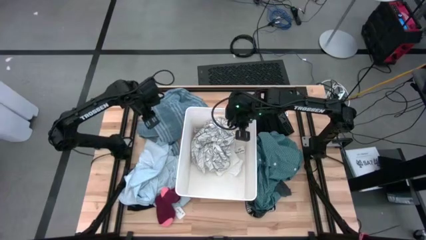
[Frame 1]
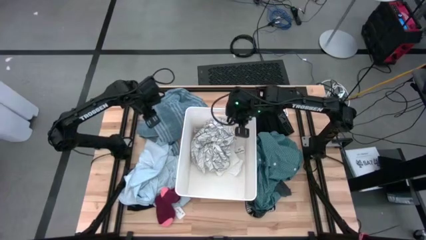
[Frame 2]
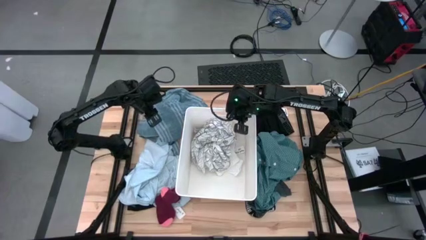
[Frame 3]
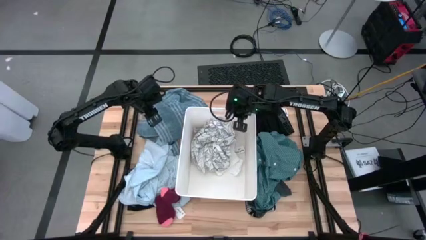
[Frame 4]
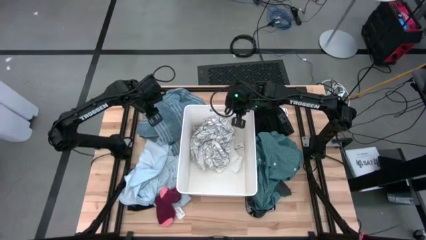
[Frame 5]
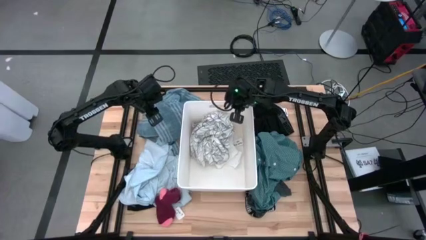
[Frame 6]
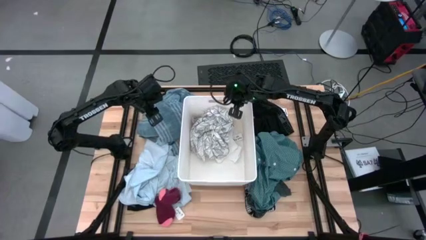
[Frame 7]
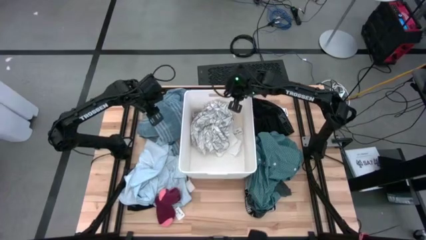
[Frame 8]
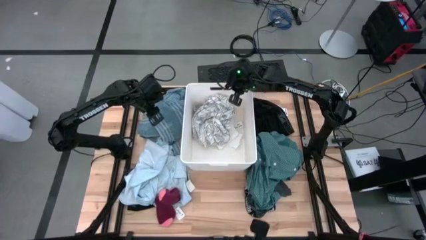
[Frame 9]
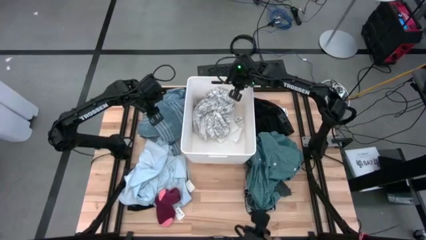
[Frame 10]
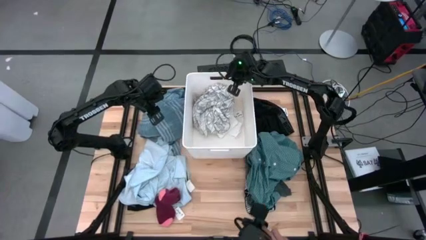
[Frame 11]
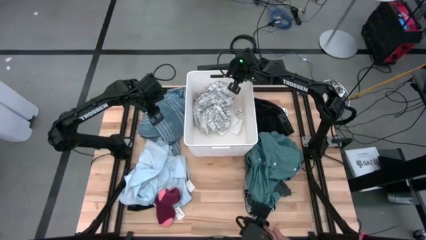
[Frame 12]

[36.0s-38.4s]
Task: Sort clothes
Move the white bin to the top center of the table

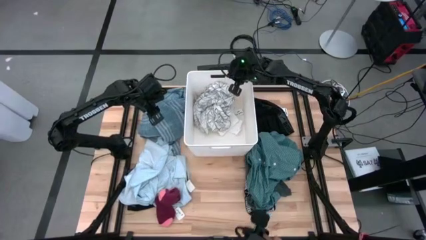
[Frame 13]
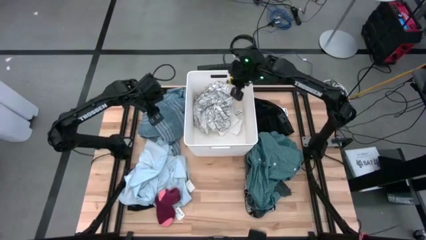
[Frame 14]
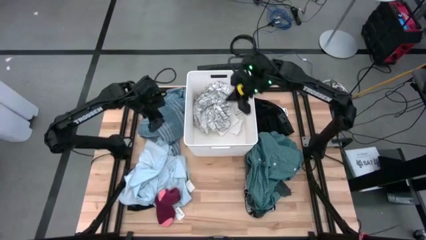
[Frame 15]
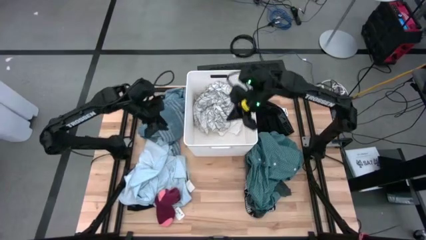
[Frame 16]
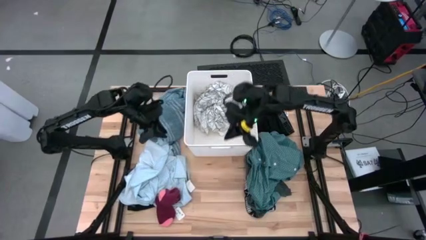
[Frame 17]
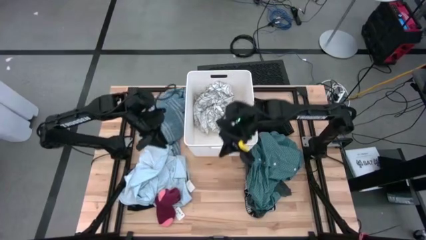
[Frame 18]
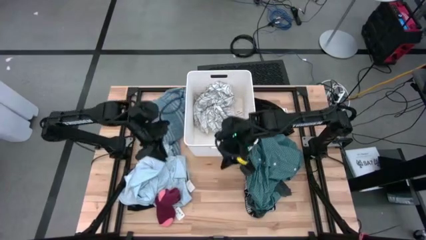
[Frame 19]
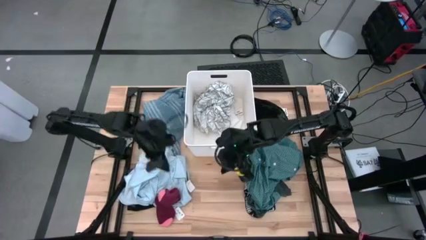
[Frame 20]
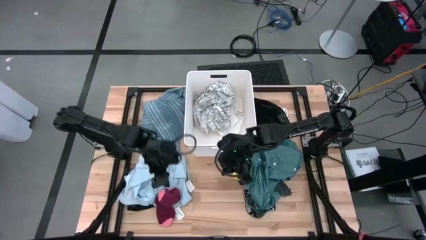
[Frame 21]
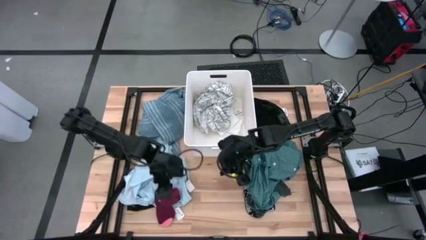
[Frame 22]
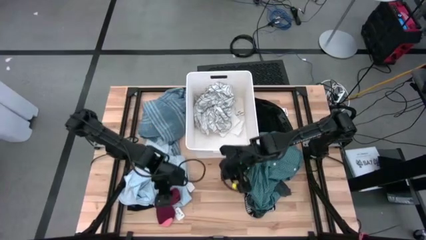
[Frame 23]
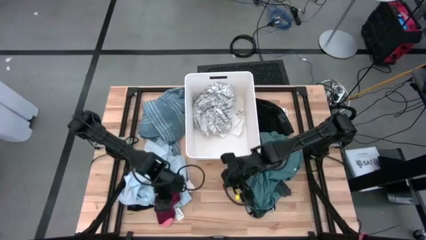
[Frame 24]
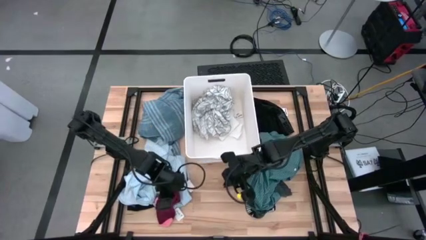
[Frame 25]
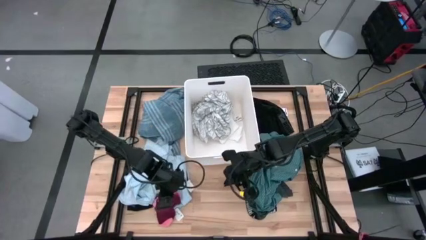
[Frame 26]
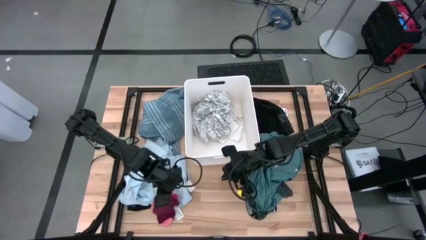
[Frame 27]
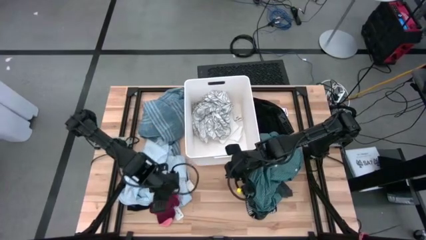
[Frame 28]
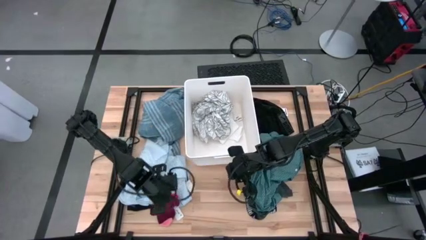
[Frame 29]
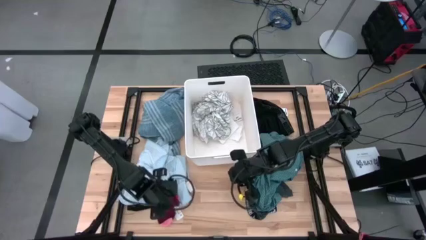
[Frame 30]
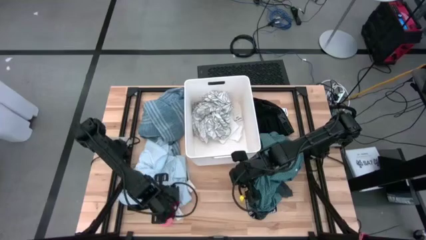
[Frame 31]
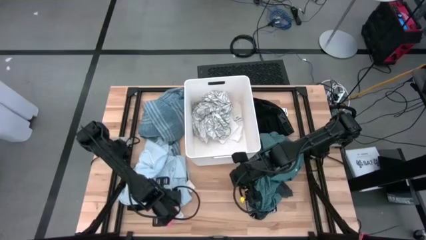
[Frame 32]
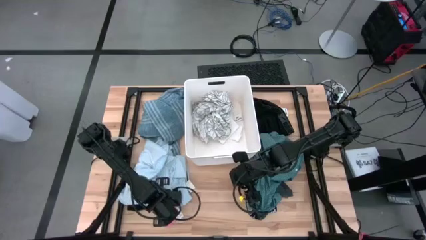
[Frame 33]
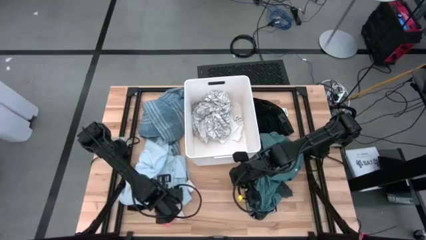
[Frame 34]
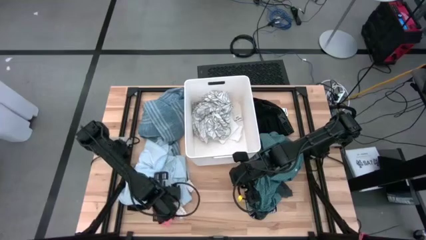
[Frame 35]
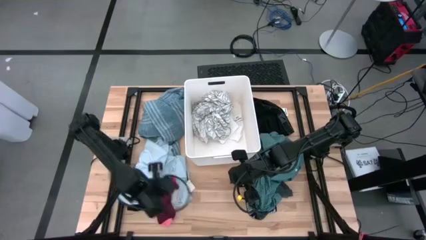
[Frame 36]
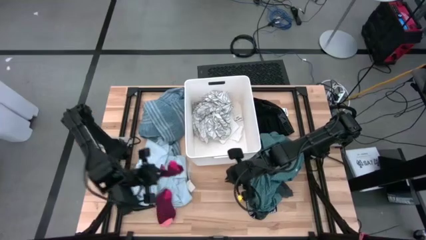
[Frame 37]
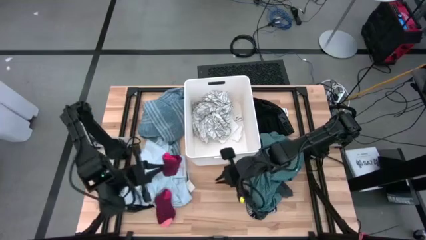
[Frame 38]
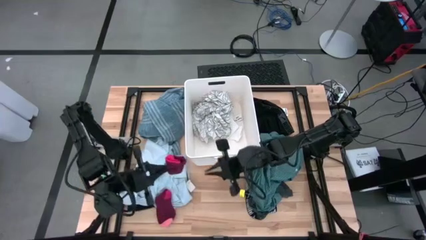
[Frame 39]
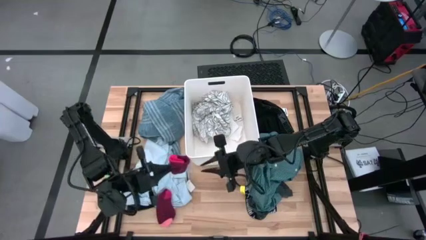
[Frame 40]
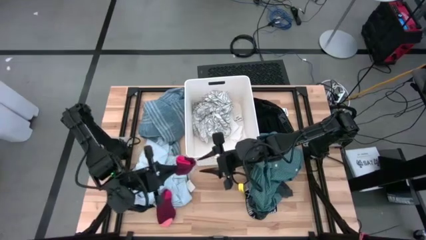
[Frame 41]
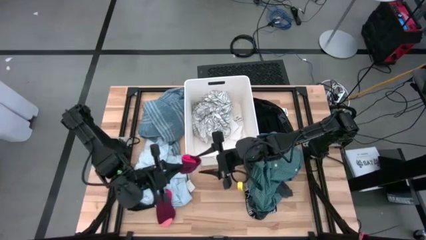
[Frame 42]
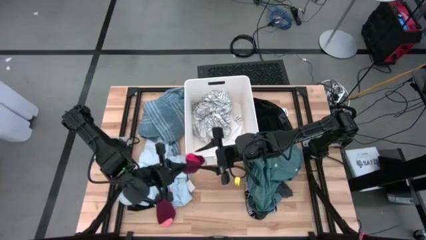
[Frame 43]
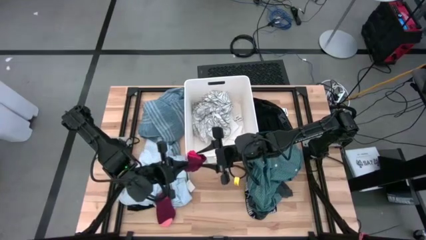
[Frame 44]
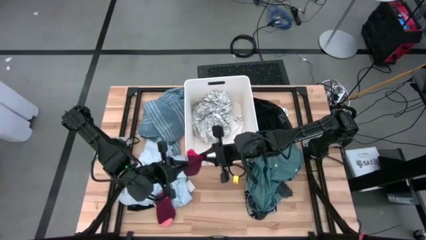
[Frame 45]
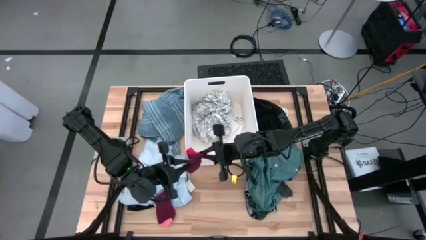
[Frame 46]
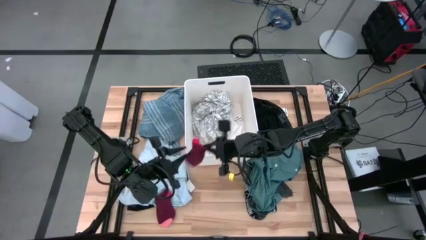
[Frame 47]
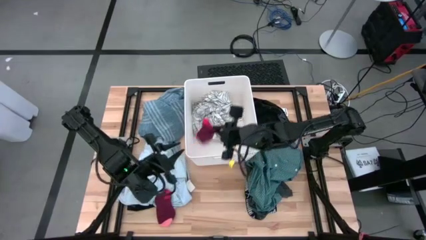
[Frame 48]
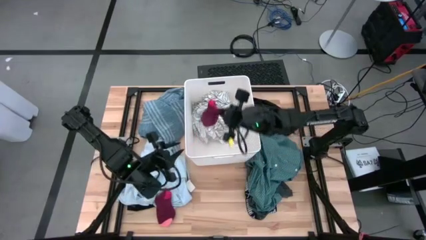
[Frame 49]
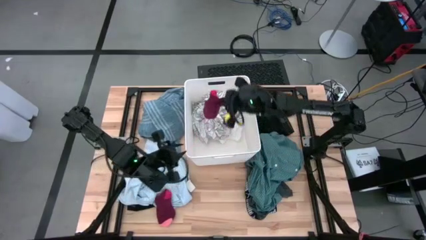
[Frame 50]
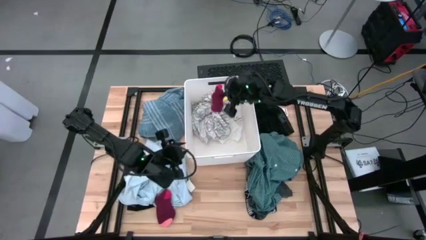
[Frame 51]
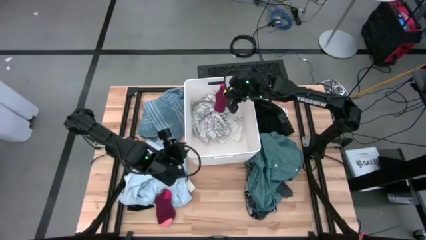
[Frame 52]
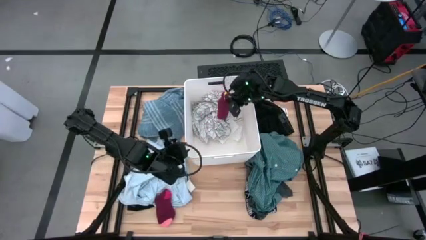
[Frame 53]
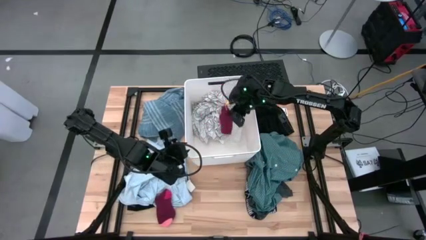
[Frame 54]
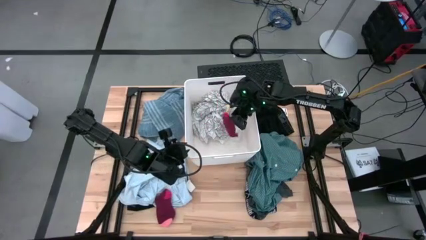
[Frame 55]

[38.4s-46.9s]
Put the top red sock into the white bin

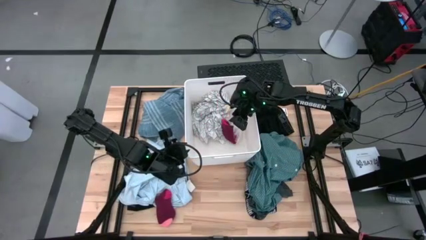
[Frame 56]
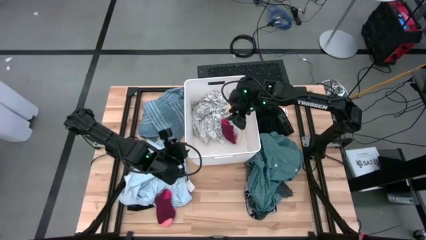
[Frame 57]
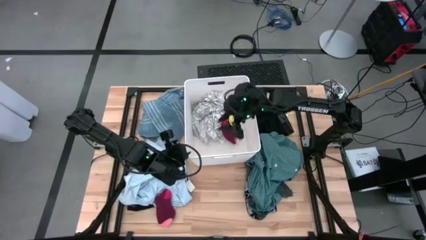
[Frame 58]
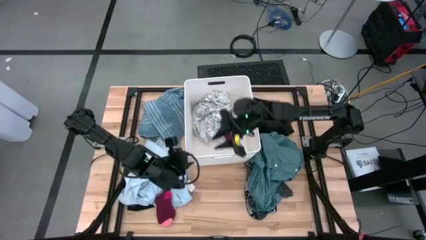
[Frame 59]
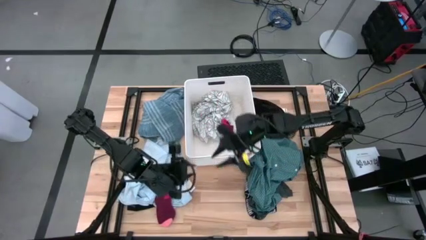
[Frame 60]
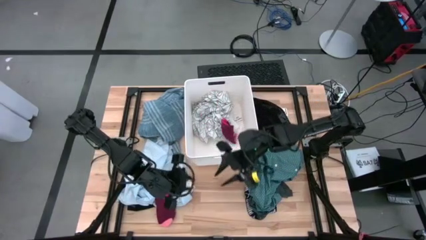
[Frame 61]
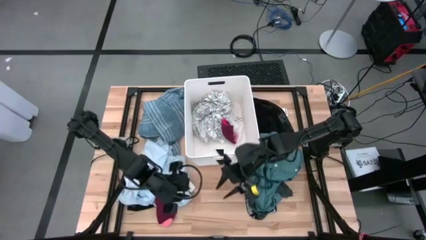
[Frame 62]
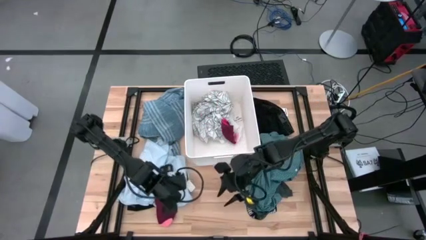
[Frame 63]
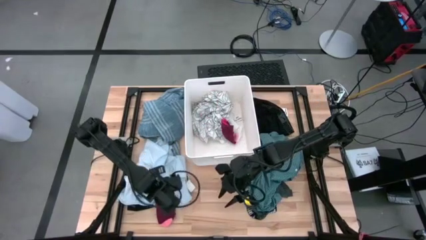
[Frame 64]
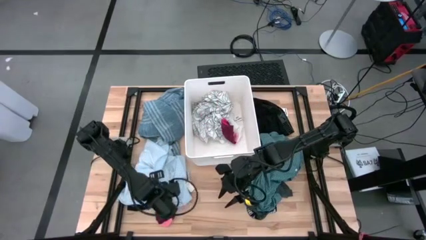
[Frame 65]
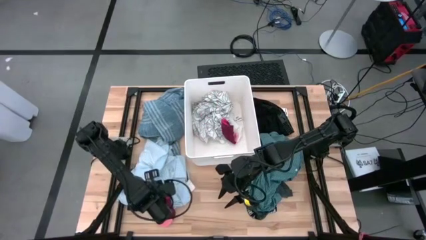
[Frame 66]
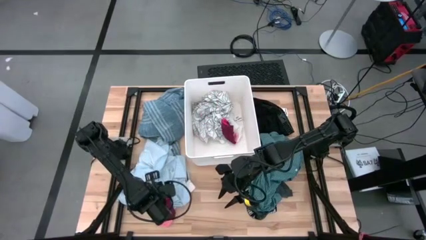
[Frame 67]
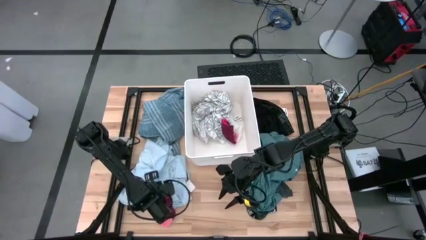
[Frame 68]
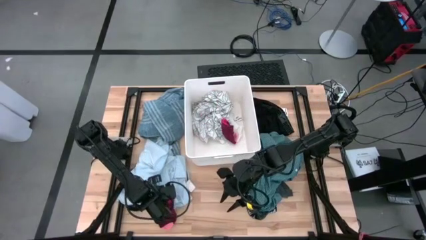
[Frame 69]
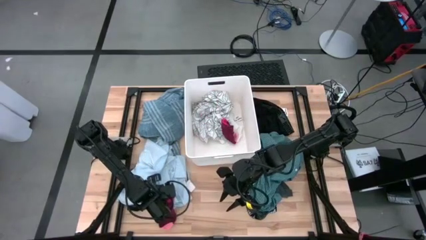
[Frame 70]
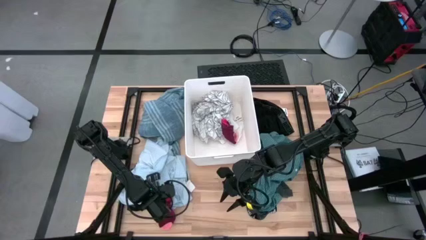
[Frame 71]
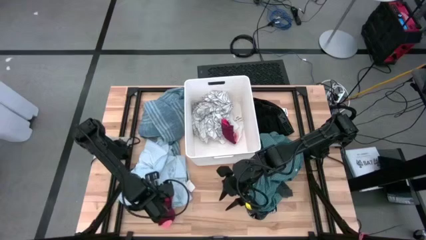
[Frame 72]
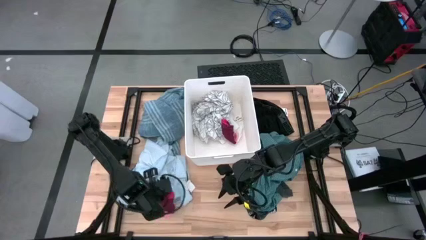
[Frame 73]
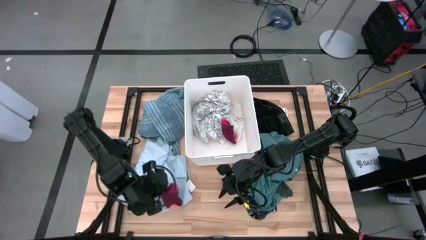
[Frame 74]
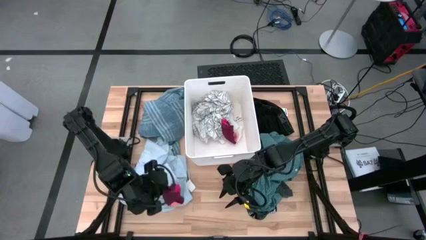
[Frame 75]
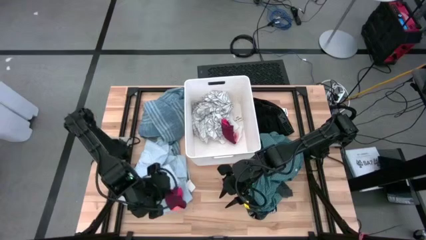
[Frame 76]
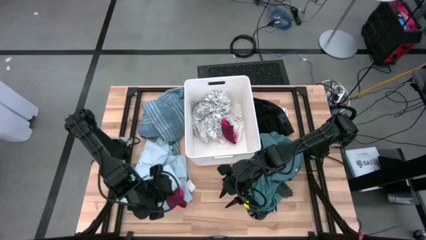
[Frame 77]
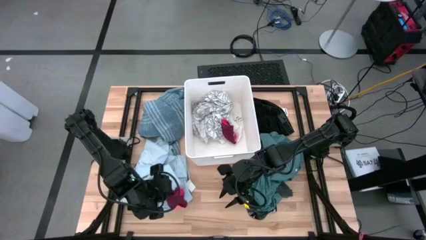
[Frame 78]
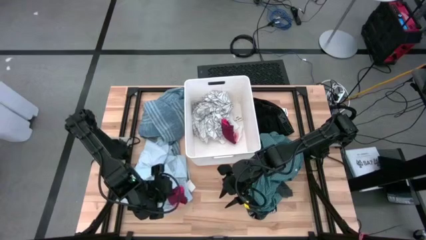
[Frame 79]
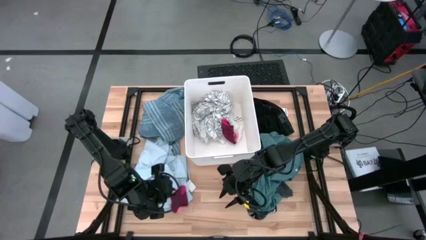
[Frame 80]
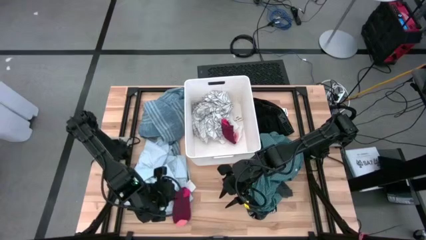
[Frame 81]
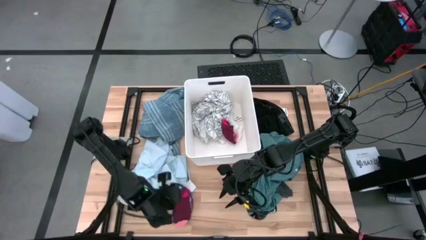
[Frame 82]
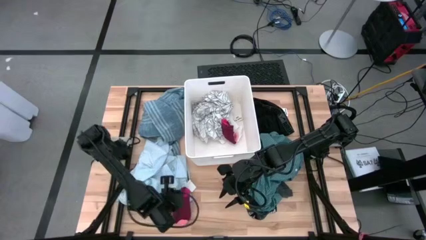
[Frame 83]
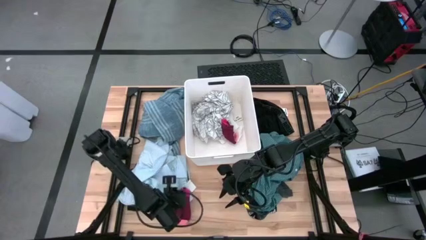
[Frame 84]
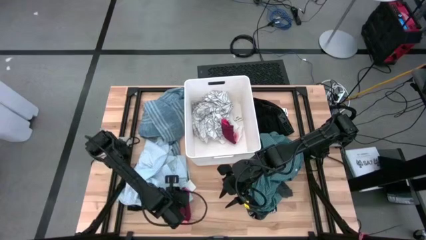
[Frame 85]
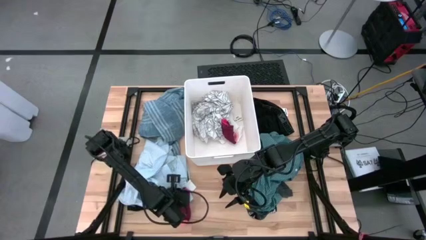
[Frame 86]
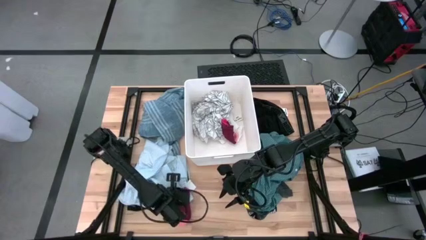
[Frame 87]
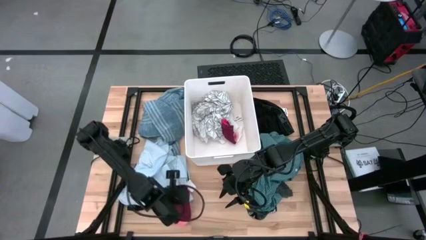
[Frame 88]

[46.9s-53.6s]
Put the red sock into the white bin
